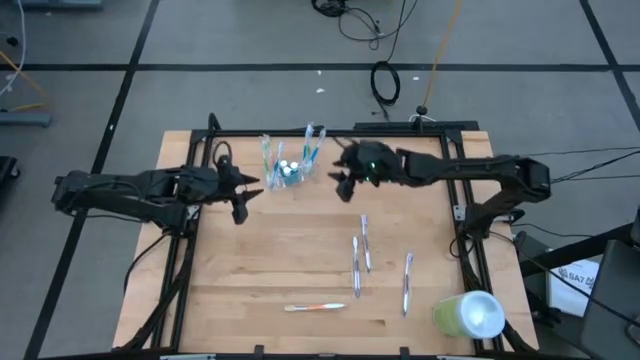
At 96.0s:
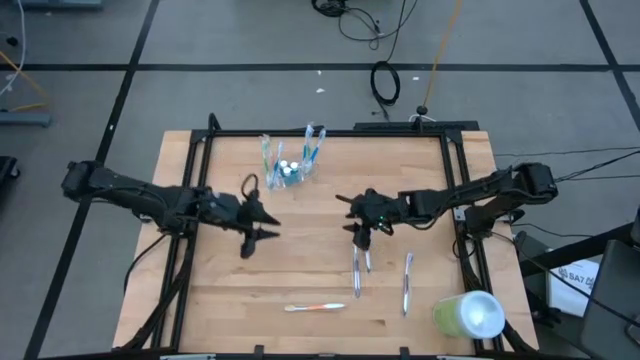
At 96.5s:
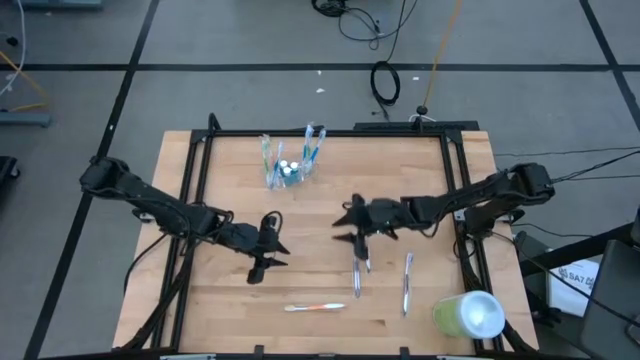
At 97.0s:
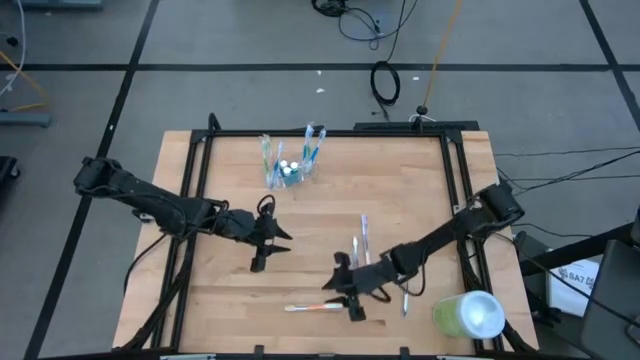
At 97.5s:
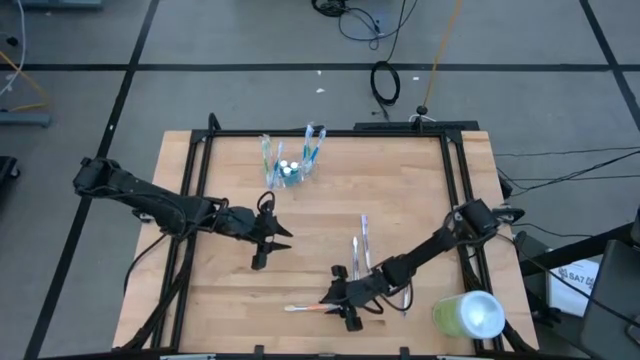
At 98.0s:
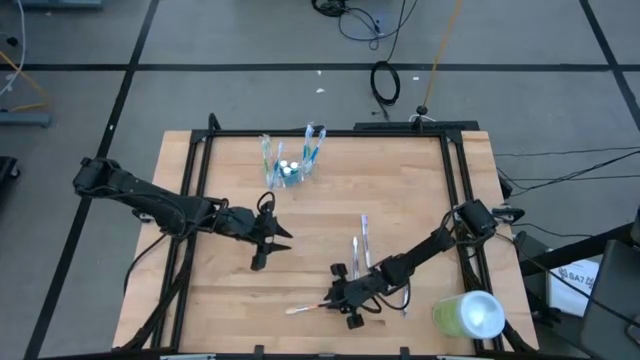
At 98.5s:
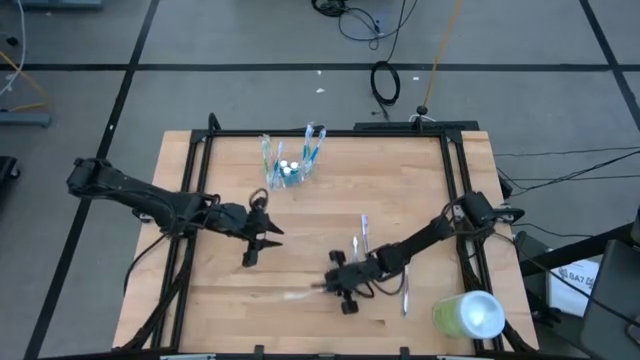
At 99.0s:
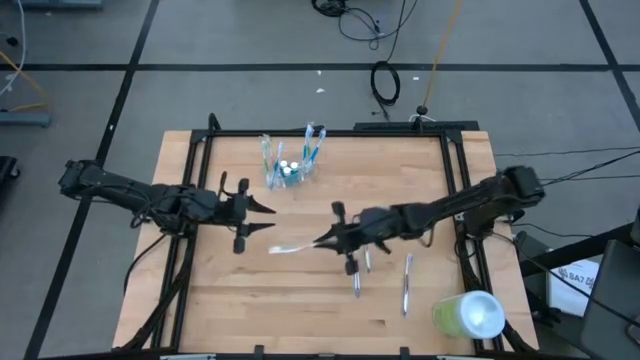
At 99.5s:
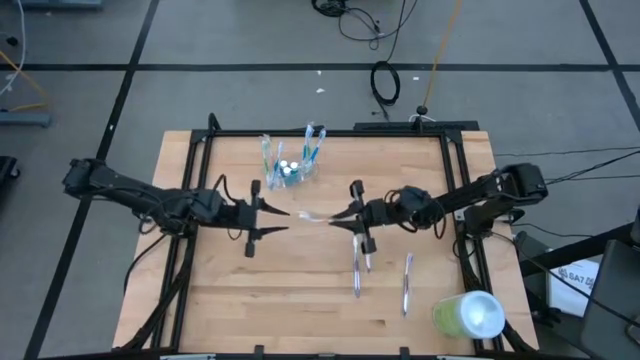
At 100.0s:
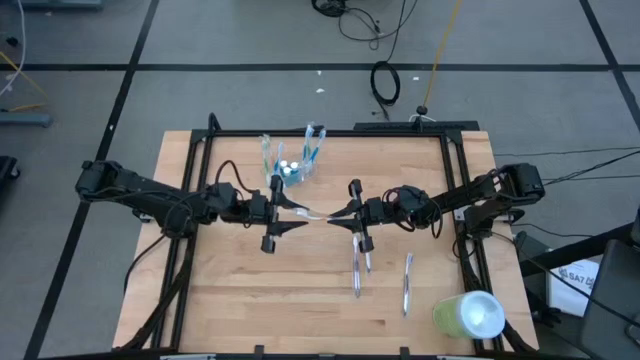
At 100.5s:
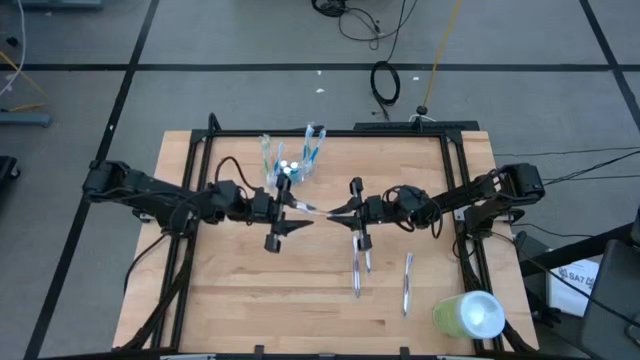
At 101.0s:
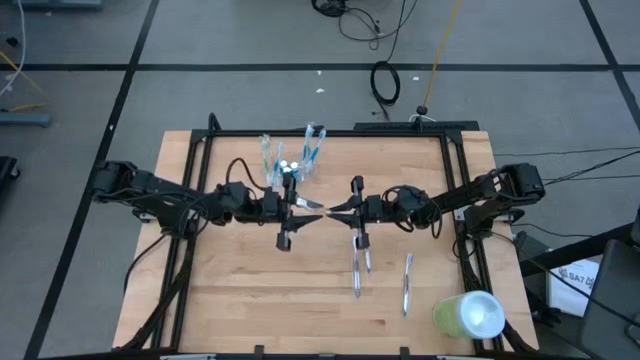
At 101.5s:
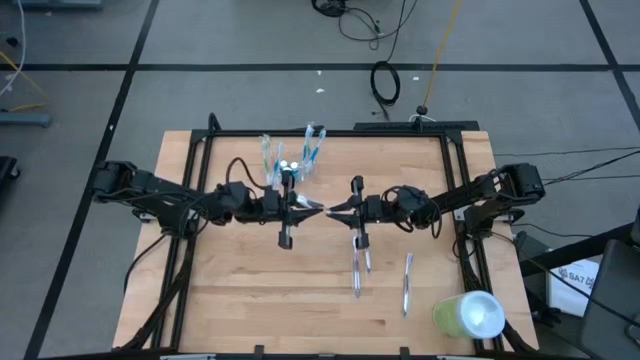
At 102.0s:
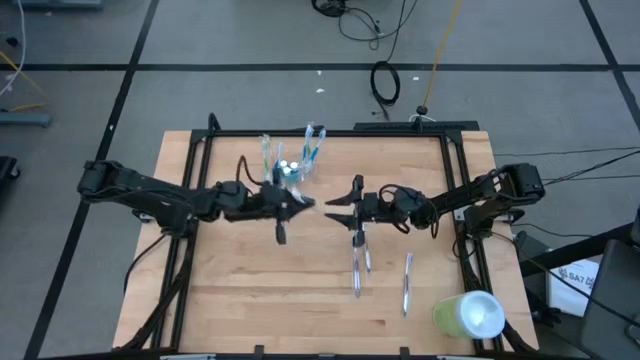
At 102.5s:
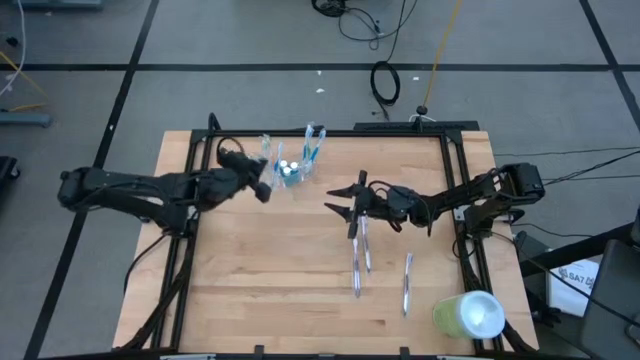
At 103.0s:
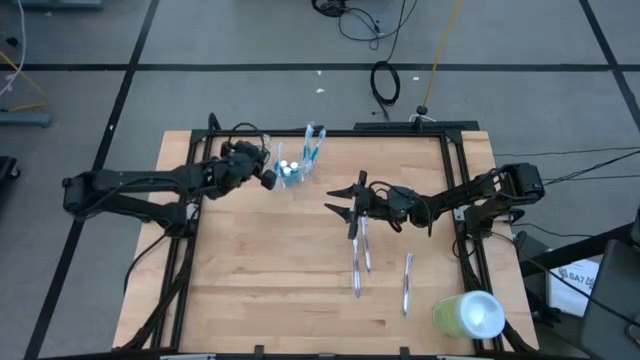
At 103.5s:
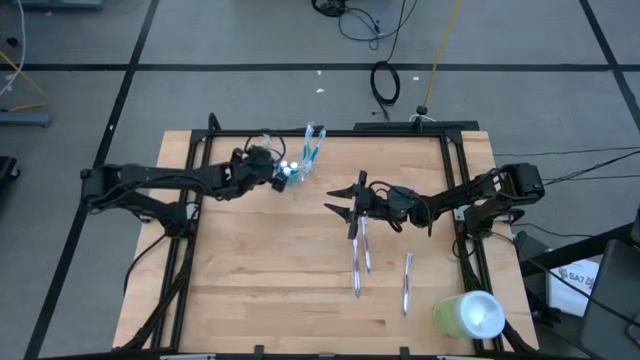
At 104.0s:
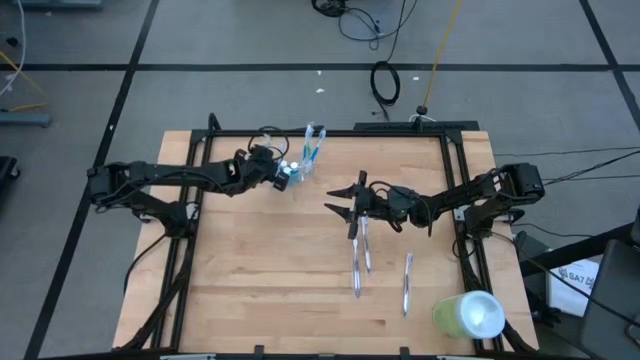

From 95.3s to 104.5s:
Task: Pick & Place toothbrushing station
Put the orange toothbrush into the transparent organizer

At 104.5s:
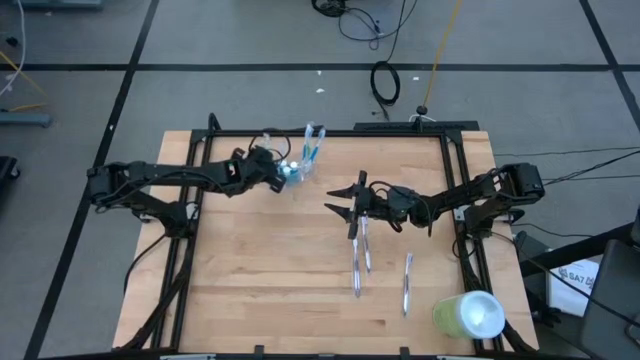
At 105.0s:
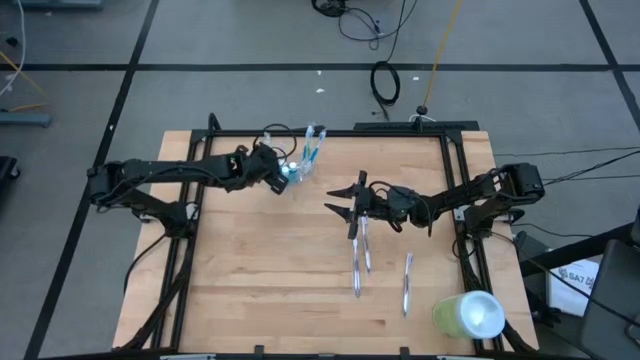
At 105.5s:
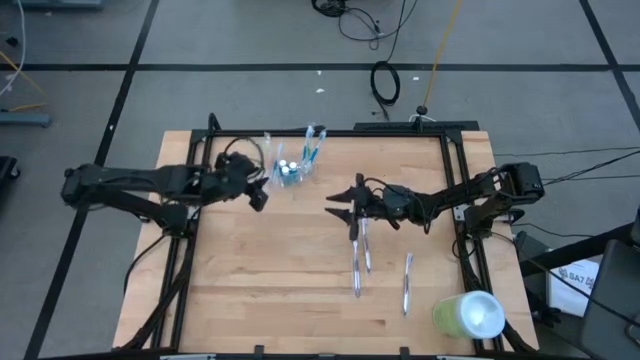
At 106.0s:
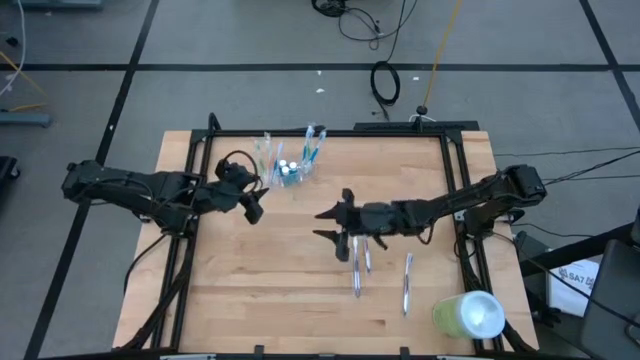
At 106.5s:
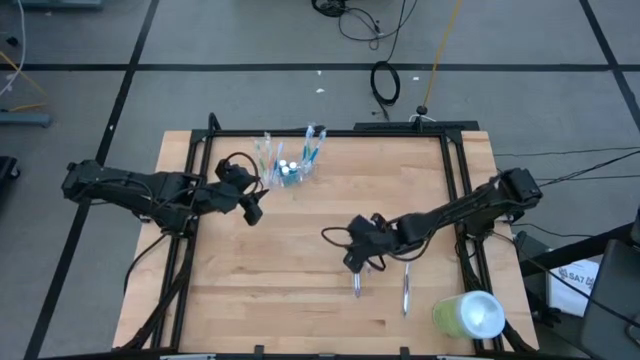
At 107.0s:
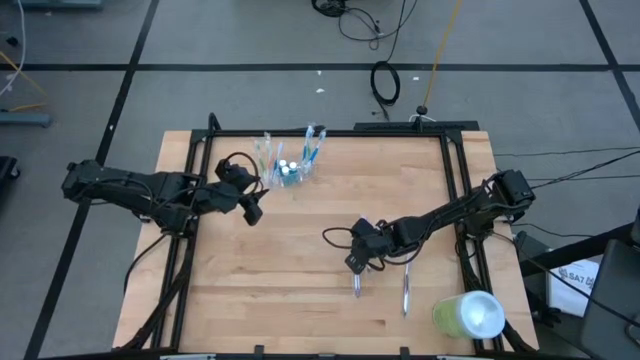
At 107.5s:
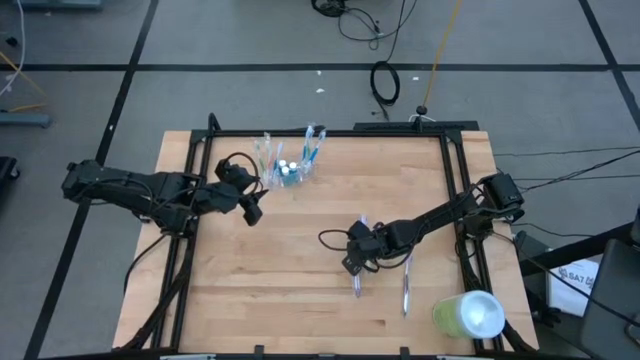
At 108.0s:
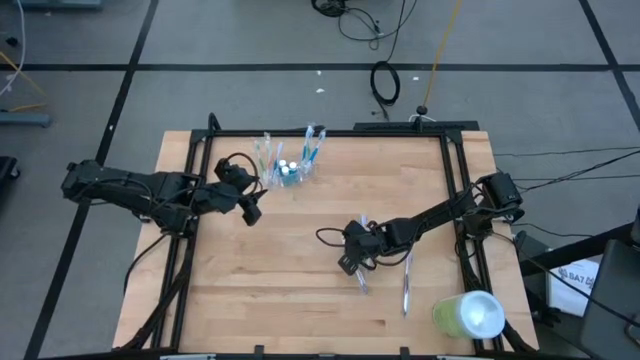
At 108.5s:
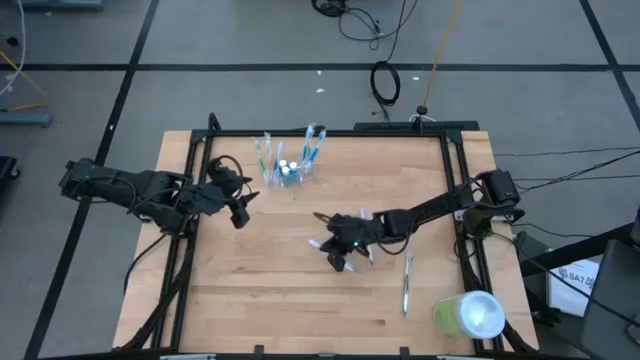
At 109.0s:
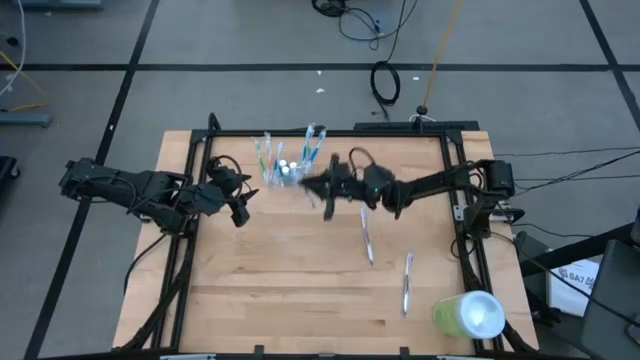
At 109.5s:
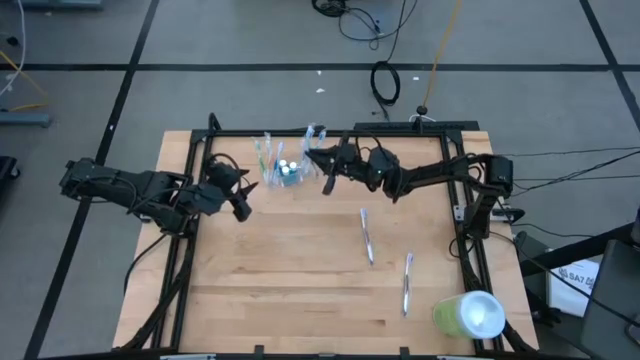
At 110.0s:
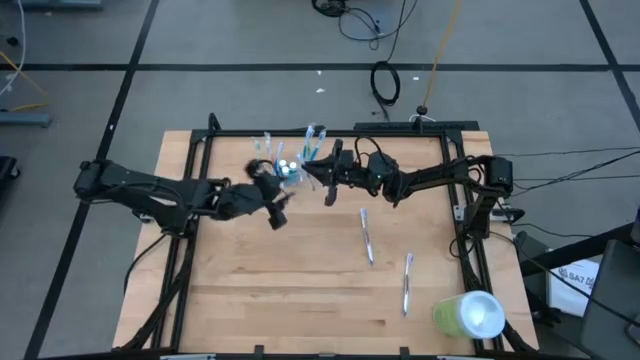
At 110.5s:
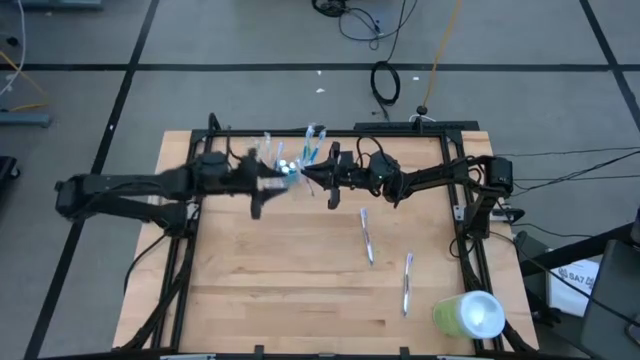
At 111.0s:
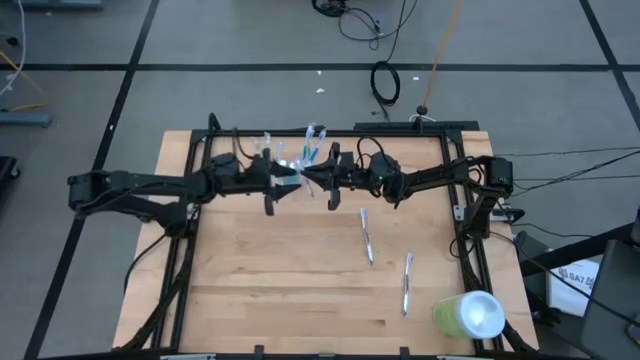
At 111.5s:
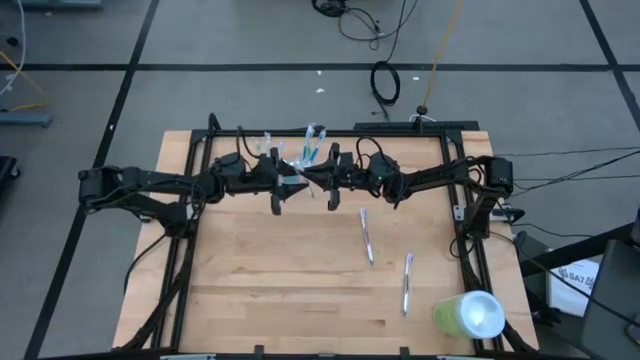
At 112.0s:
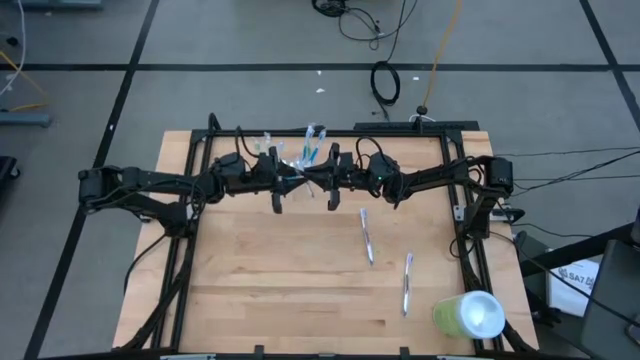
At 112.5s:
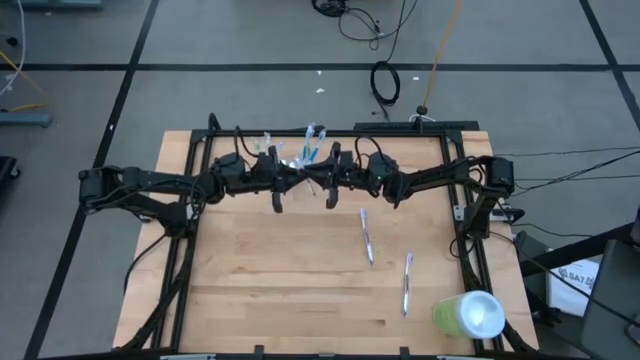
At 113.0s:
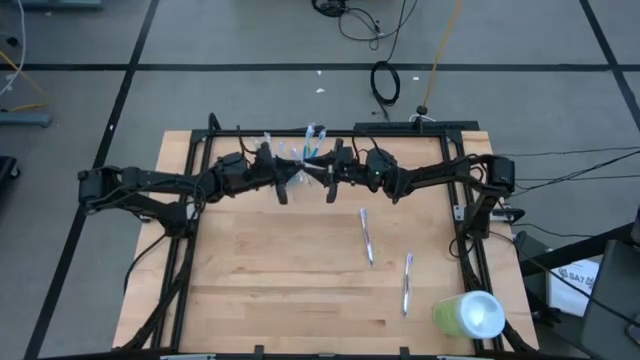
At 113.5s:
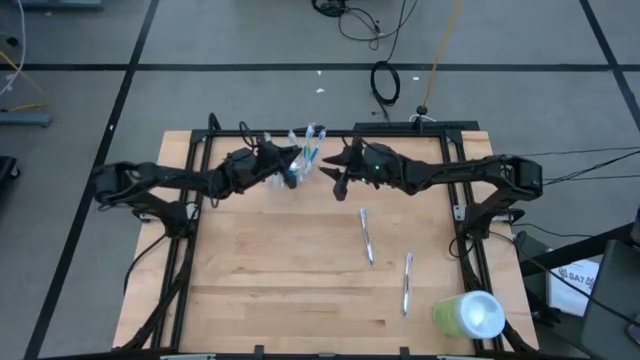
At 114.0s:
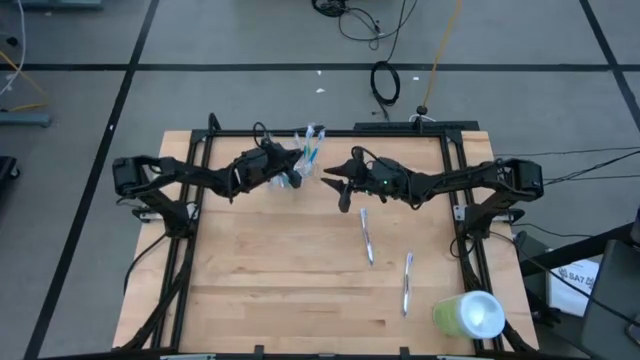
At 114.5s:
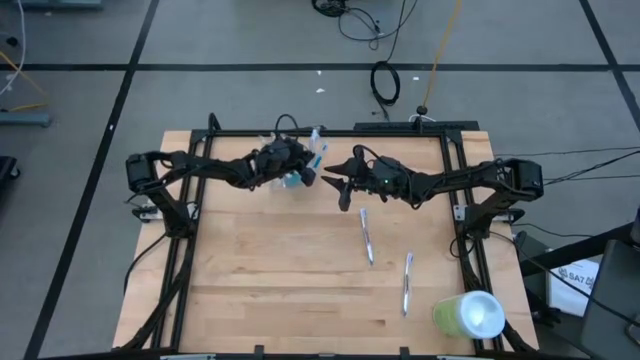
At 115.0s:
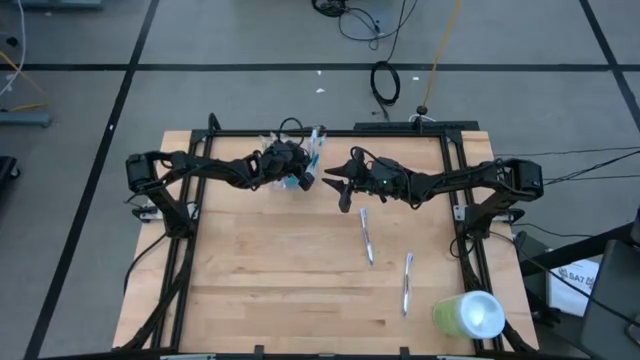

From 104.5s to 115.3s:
Put the bottom left purple toothbrush into the transparent organizer

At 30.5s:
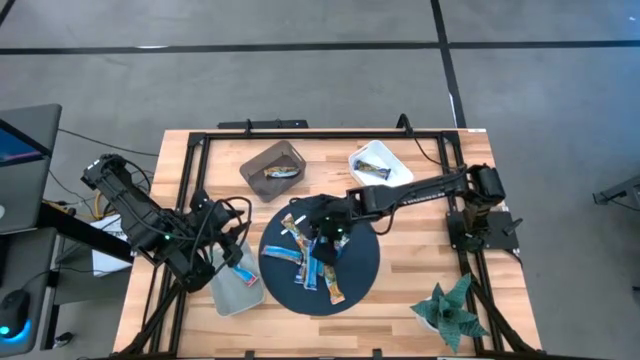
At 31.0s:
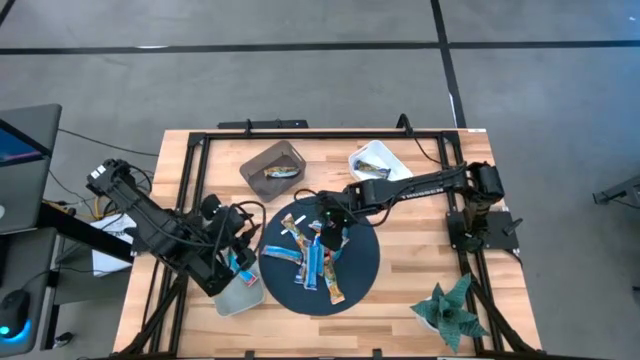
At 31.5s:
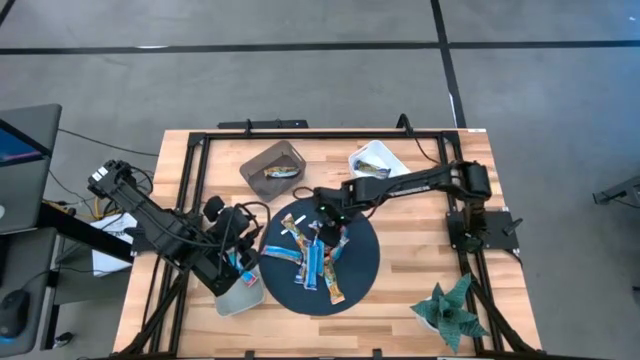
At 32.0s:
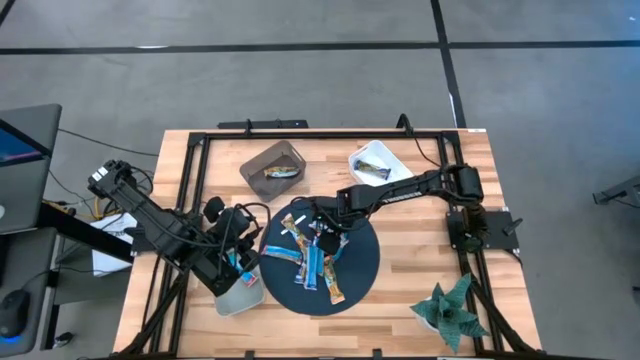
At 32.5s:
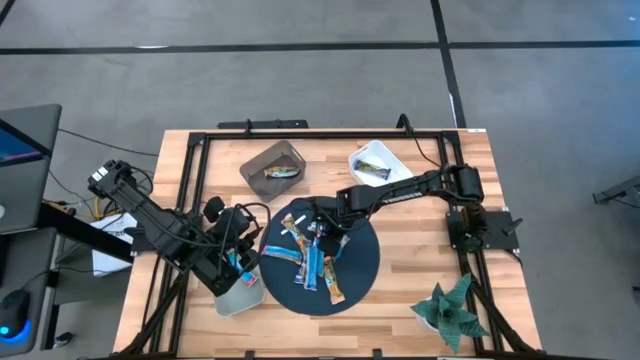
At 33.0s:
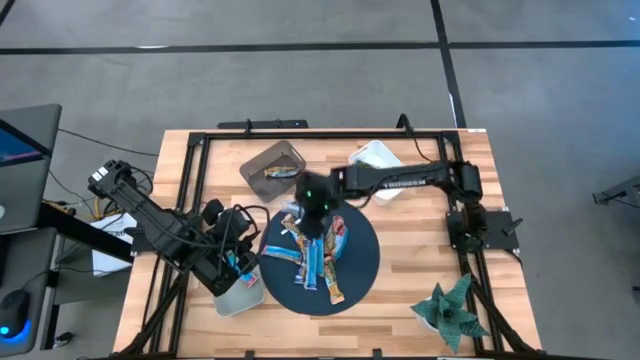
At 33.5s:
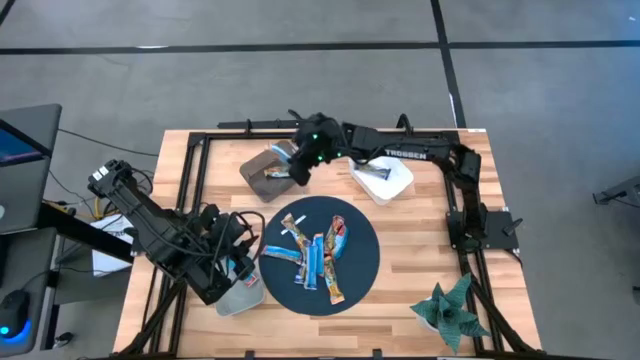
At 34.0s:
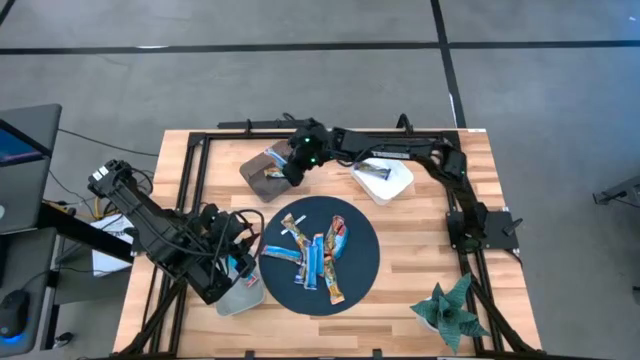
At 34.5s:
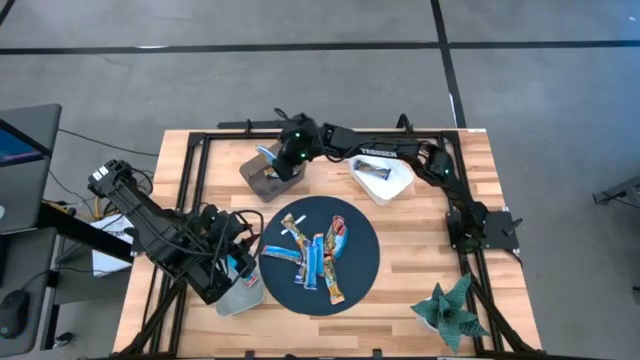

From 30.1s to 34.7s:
Task: Pick and place Granola Bars by type
Put the yellow granola bar into the black bin
